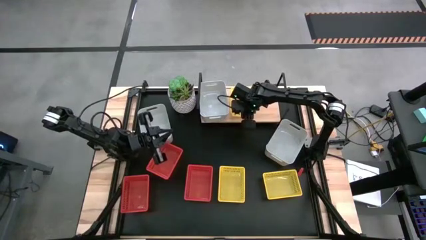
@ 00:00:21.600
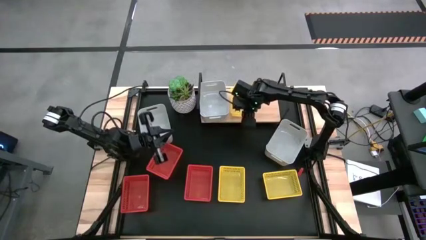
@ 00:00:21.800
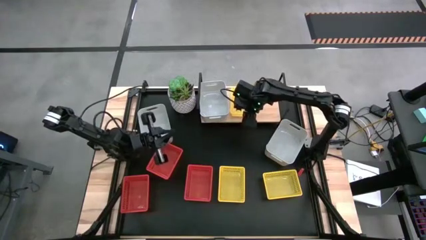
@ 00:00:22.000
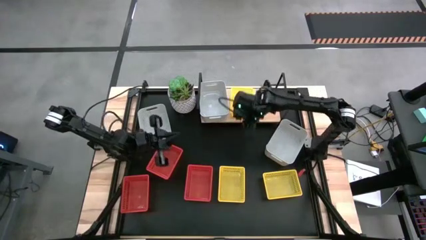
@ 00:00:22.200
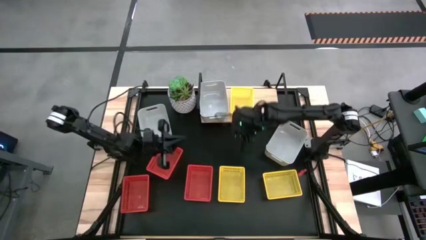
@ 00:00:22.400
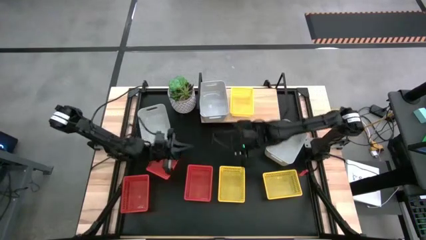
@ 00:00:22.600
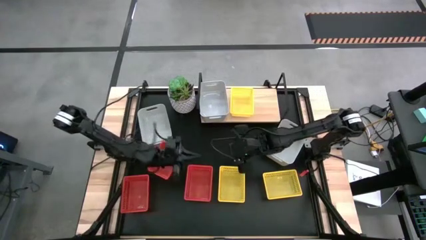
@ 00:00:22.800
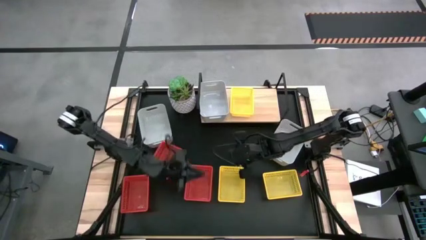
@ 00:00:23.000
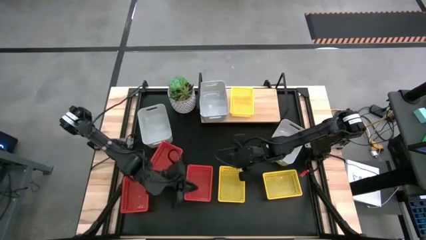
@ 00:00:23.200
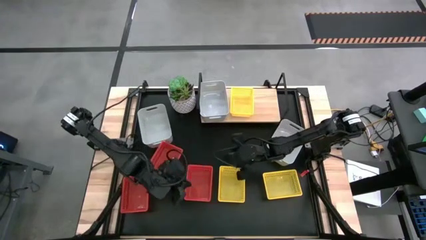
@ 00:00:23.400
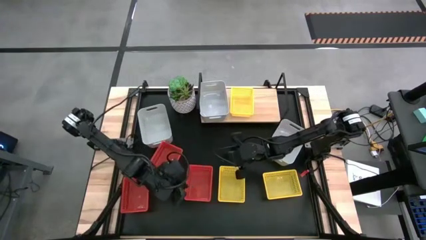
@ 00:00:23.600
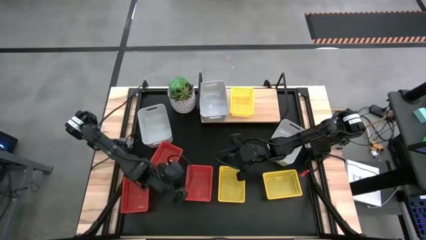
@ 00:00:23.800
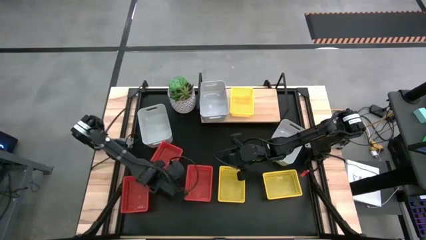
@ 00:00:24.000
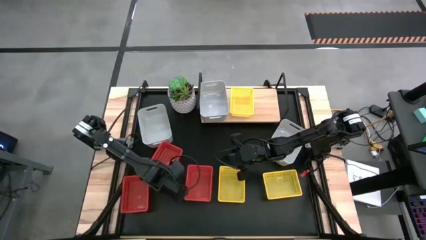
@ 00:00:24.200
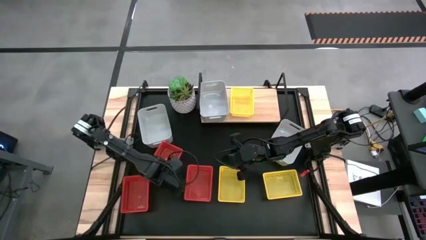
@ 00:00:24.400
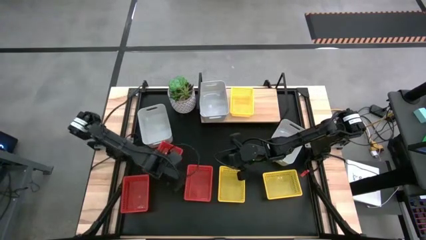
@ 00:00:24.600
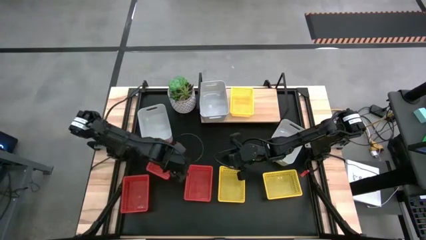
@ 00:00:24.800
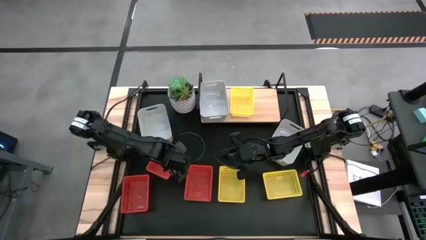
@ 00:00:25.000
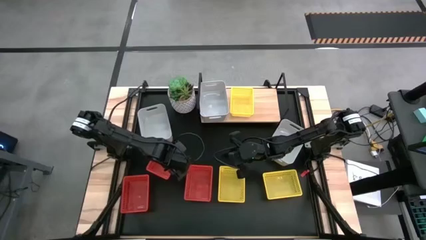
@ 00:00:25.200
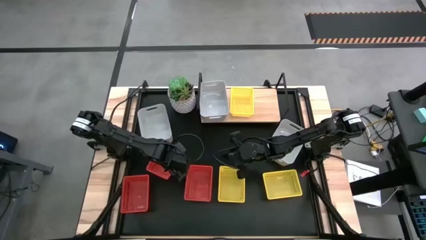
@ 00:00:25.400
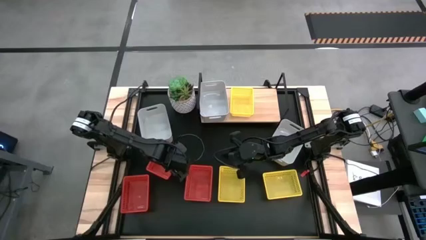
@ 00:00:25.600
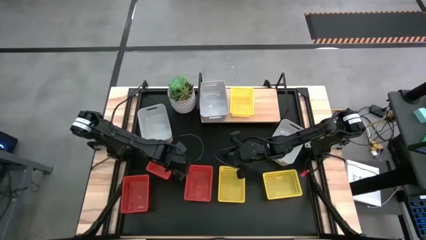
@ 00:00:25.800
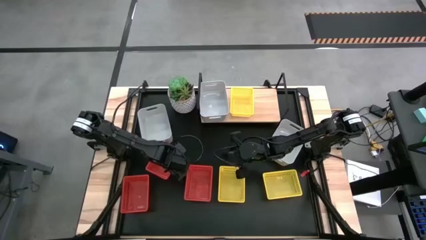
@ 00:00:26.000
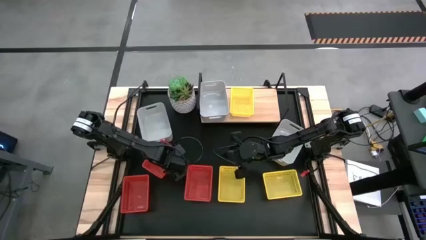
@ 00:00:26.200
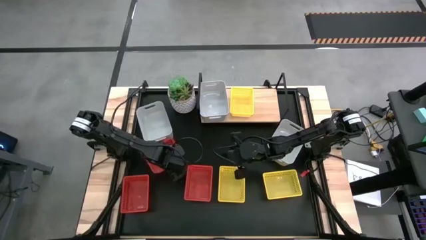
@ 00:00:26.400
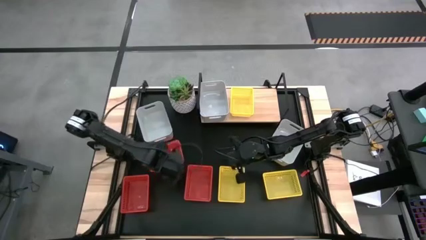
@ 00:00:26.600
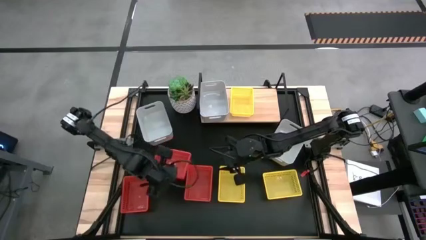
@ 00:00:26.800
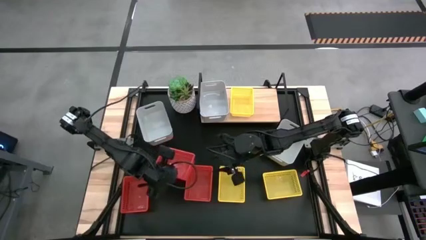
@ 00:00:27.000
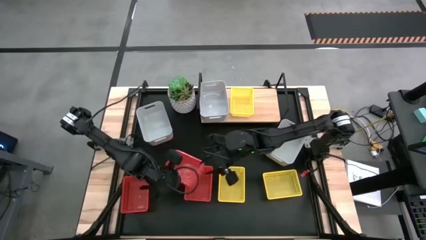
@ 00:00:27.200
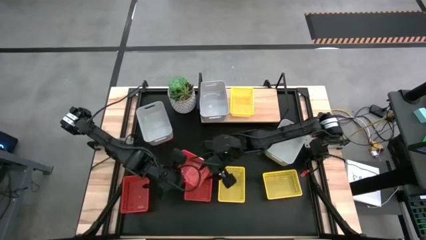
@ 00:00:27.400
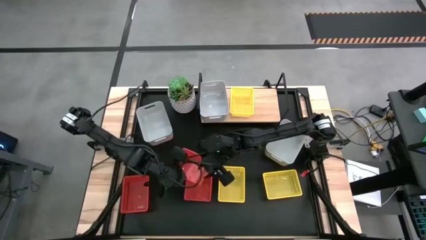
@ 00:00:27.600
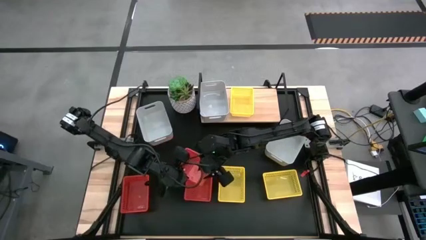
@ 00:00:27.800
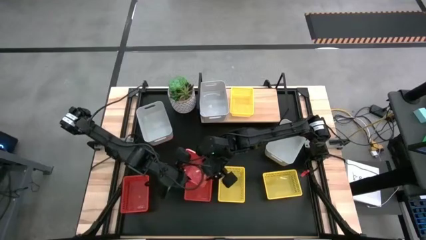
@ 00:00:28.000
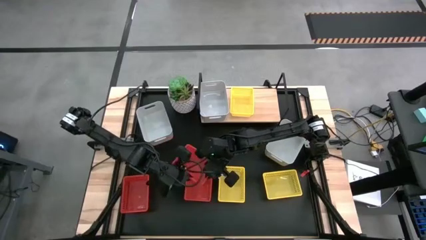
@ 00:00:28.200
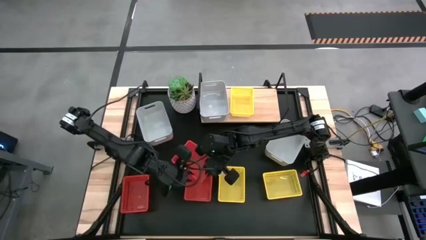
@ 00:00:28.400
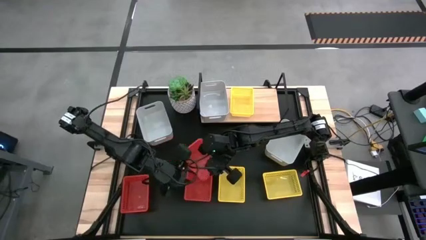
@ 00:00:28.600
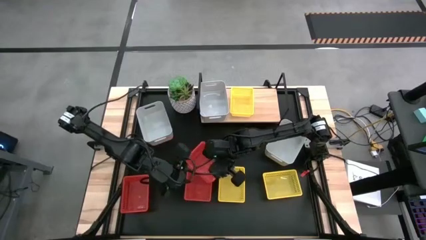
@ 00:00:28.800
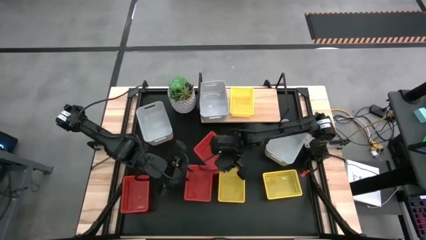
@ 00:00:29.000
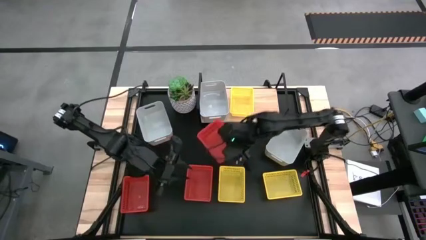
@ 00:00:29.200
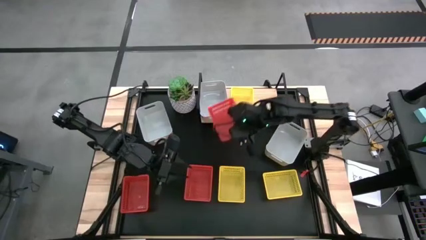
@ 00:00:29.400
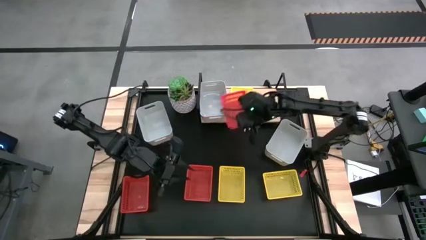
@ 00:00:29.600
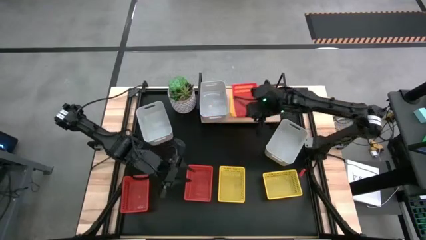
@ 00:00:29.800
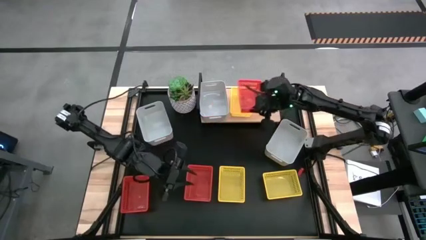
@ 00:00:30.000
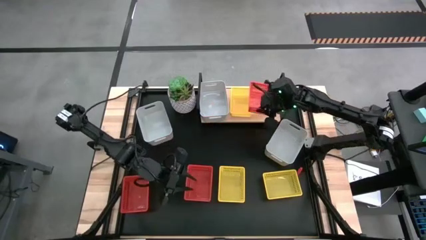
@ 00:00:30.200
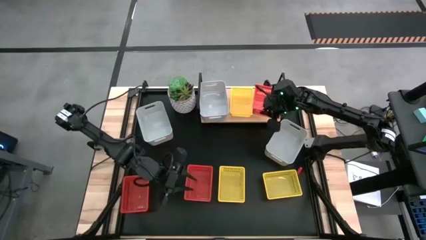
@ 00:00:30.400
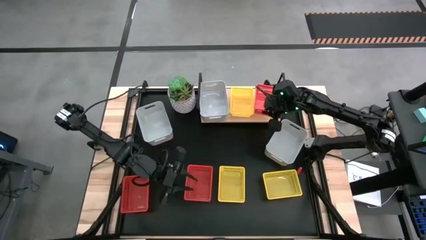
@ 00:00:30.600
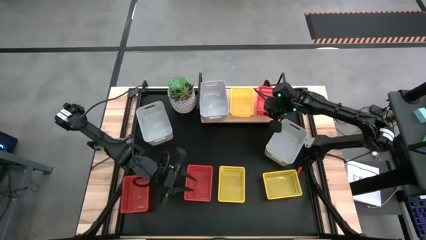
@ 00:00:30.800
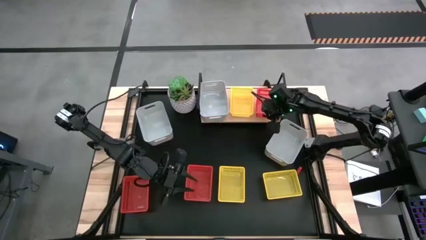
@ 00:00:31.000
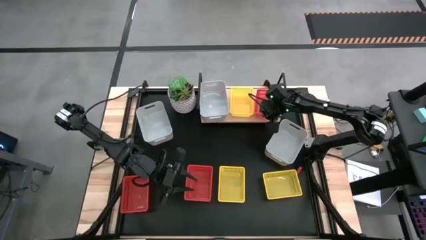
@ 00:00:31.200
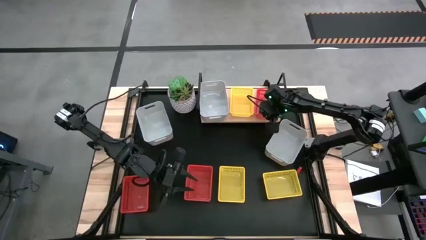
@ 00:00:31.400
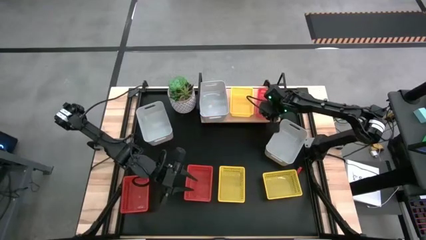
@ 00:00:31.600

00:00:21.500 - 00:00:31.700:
Task: Stack baskets on shelf by color
Put the top red bin on the shelf

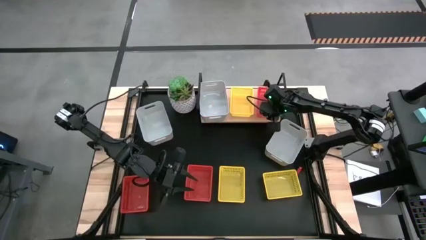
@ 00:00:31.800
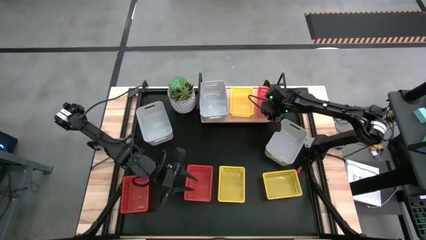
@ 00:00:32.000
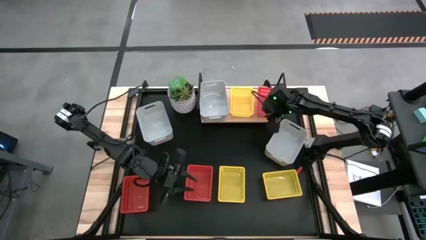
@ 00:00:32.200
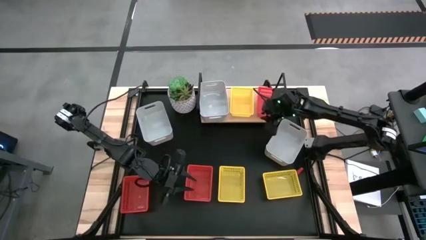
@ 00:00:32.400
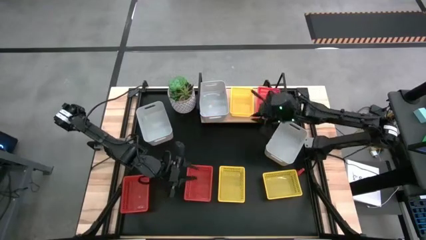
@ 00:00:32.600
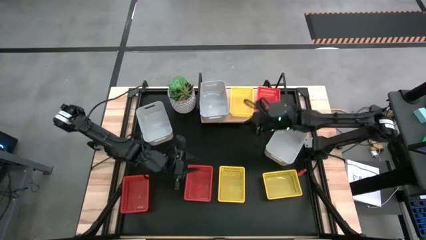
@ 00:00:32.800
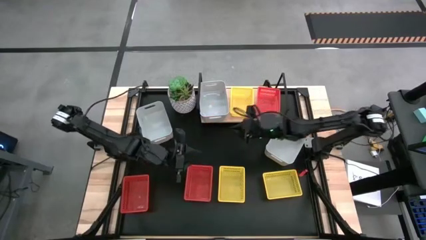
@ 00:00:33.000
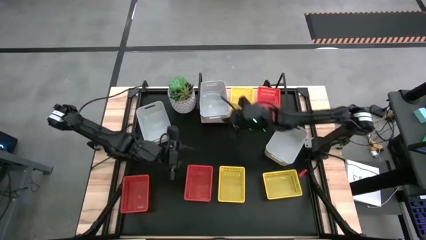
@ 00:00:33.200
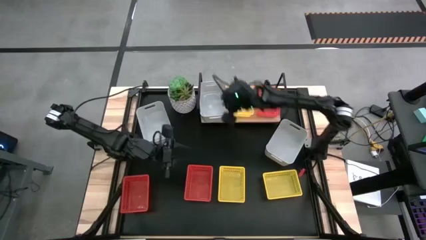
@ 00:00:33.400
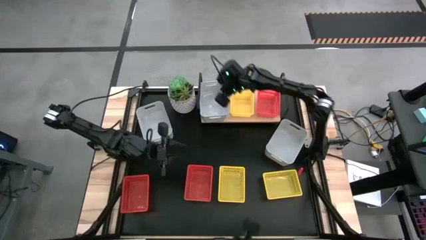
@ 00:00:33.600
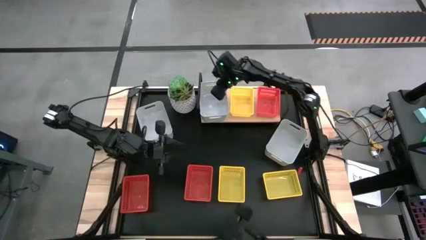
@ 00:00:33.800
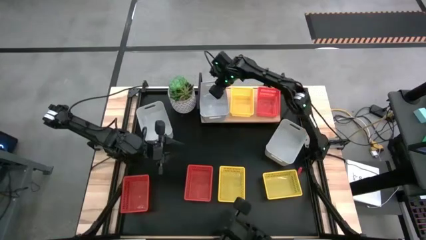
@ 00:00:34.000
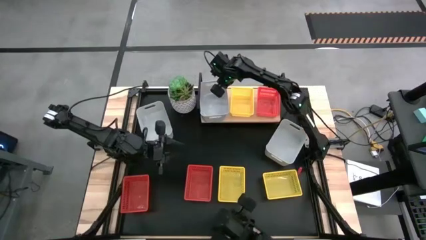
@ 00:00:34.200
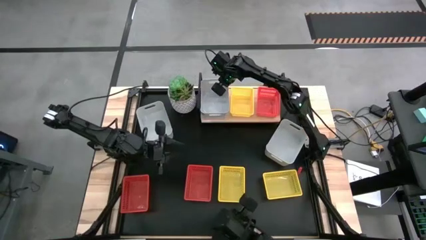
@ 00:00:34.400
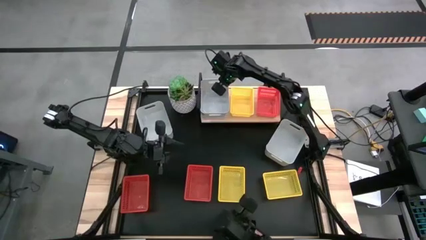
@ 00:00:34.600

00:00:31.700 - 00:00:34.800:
Adjust the gray bin on the shelf

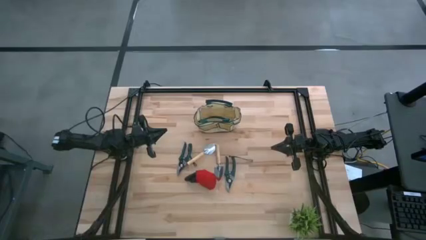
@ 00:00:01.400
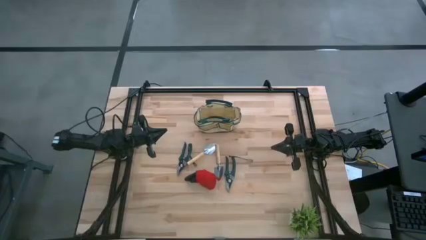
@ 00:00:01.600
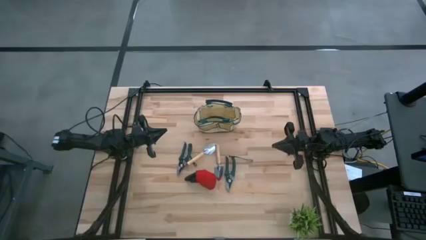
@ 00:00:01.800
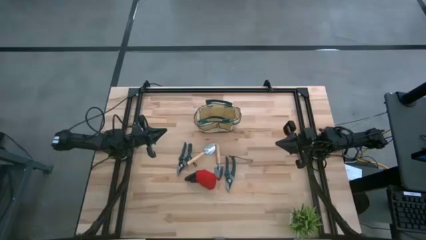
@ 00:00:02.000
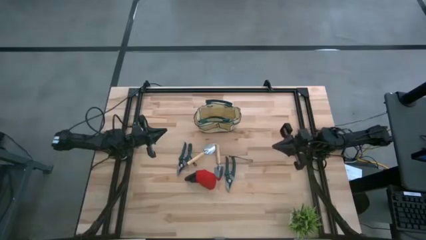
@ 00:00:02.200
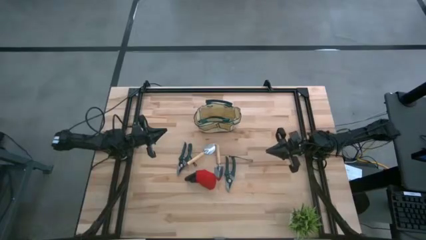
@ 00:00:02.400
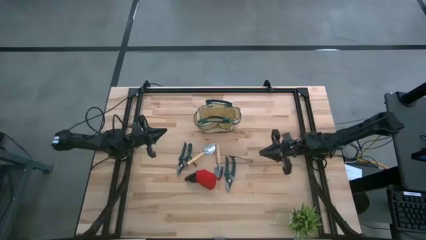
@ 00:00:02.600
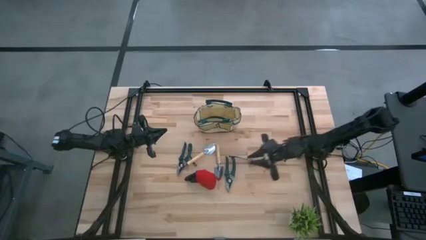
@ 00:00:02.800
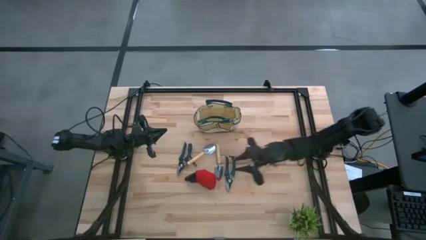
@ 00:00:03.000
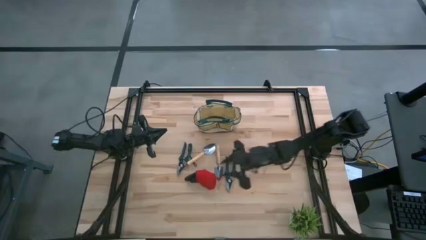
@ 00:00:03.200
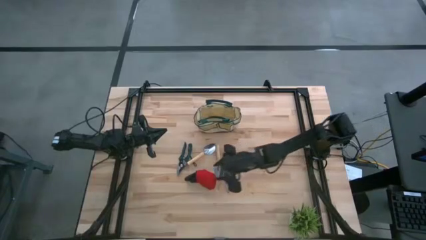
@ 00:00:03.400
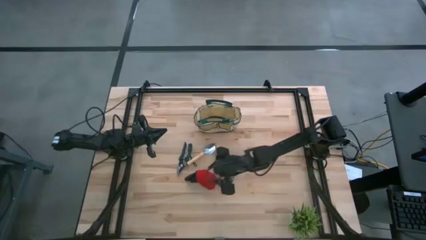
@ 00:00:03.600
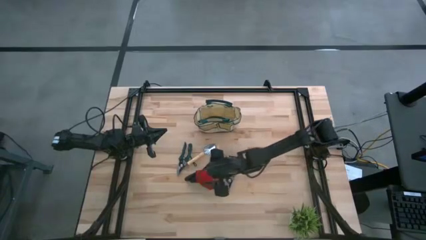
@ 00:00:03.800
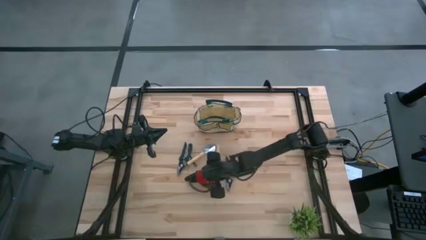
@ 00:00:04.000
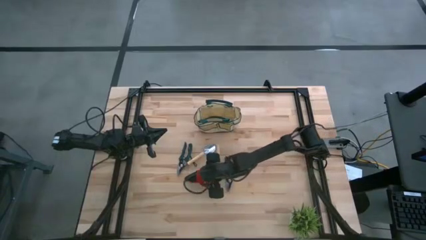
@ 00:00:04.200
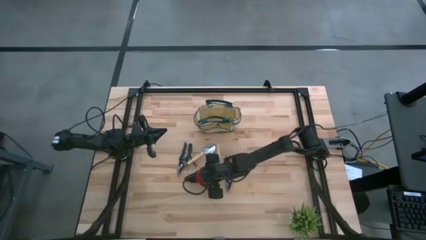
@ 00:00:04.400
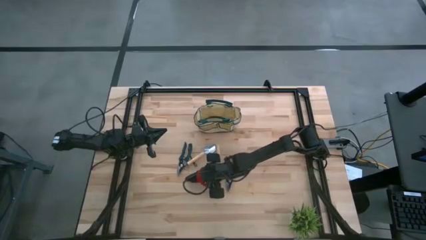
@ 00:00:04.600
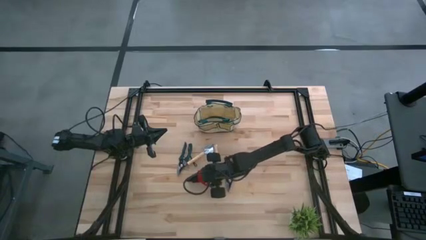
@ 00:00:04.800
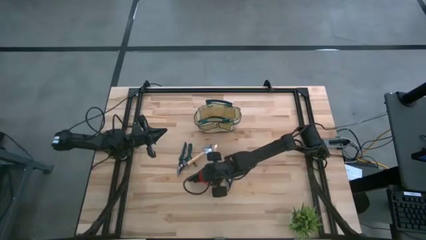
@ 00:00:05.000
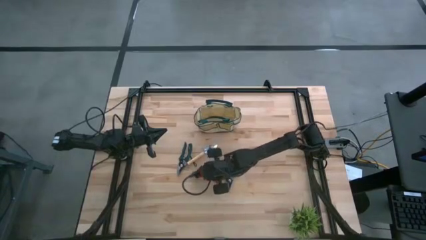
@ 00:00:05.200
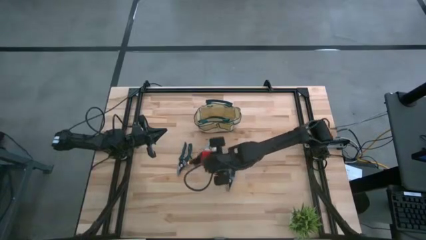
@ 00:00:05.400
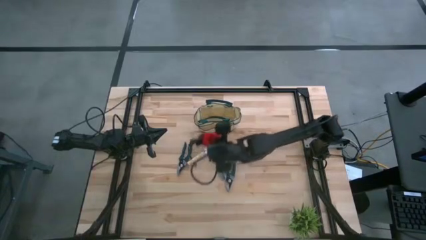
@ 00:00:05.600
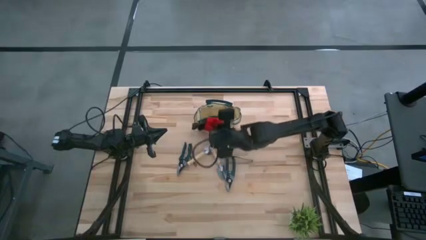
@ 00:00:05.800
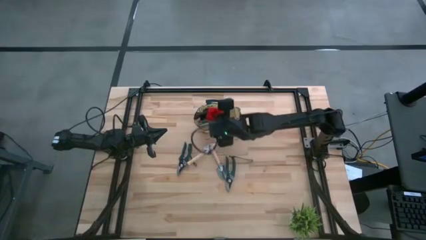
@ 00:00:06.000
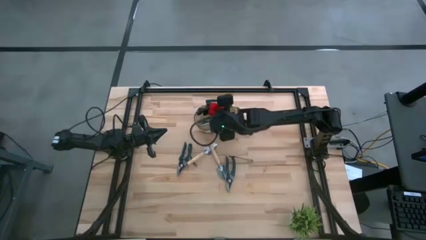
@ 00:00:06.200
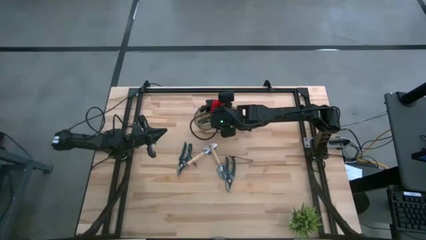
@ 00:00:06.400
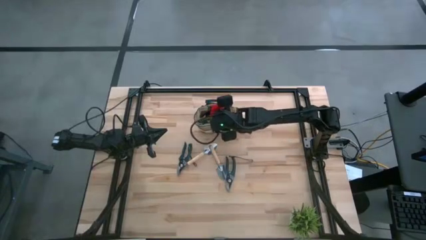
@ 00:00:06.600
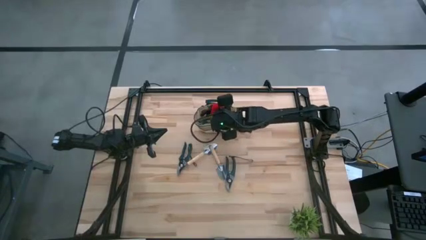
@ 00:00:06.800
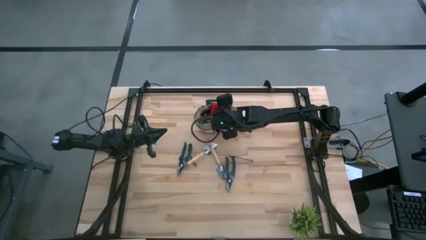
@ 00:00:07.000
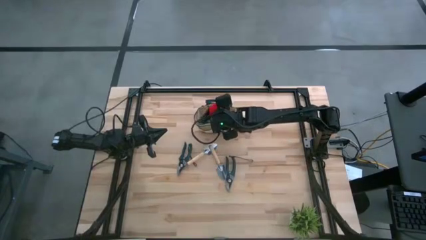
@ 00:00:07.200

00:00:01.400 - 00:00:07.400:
Task: Pick & Place Garden tools in Gardening bag
Put the gloves into the gardening bag
